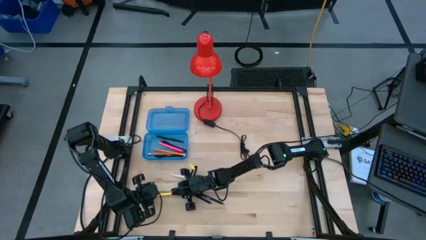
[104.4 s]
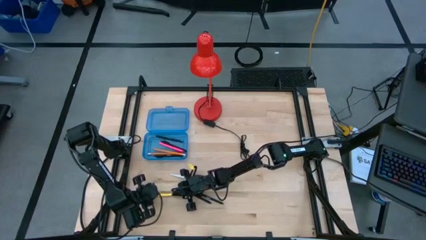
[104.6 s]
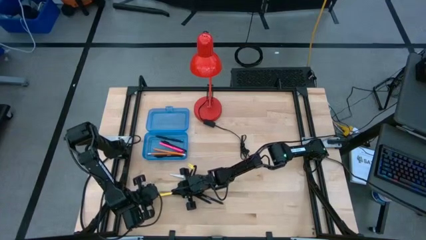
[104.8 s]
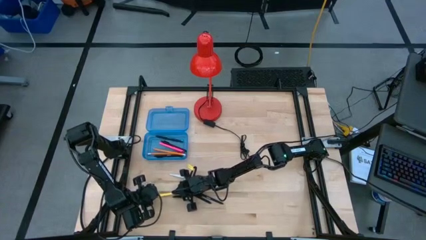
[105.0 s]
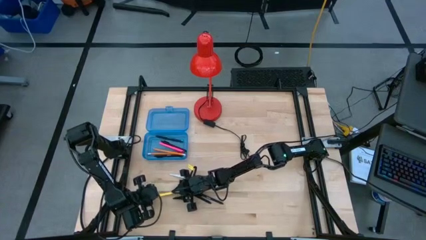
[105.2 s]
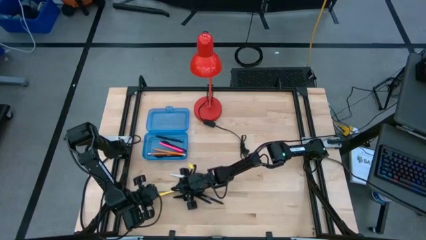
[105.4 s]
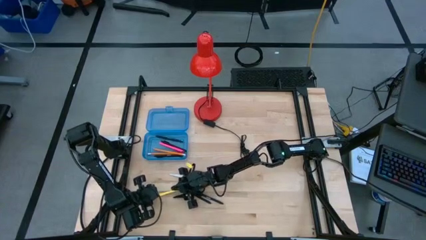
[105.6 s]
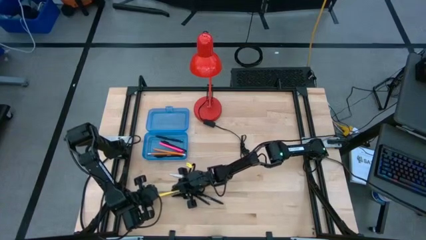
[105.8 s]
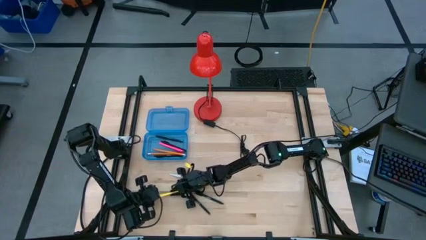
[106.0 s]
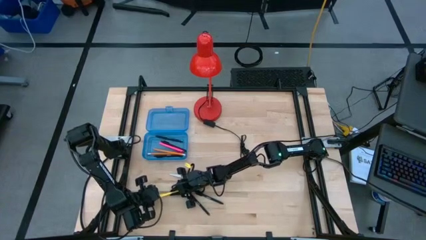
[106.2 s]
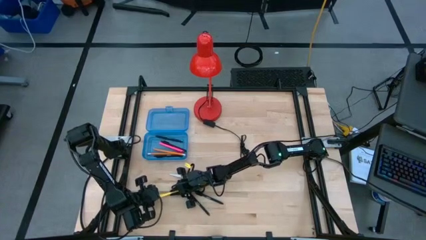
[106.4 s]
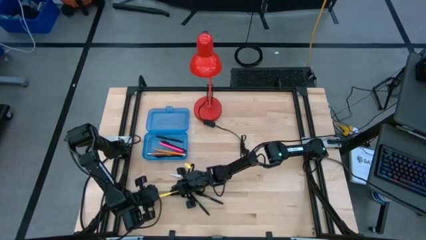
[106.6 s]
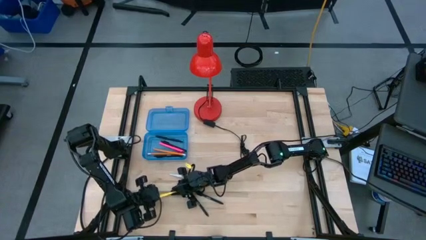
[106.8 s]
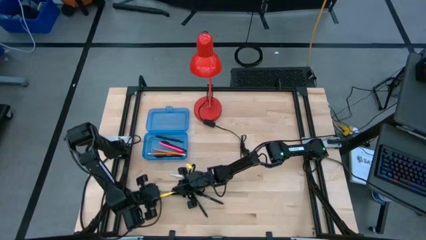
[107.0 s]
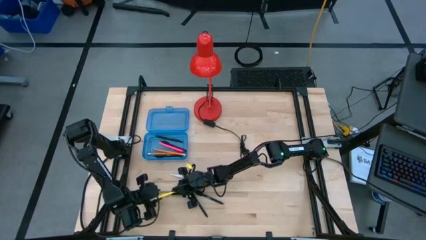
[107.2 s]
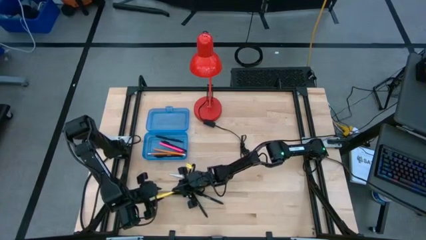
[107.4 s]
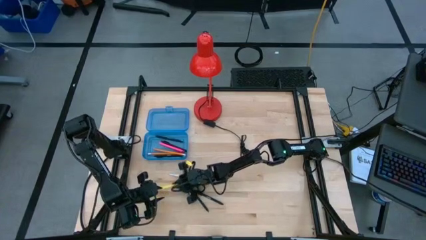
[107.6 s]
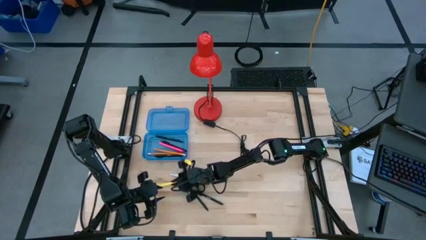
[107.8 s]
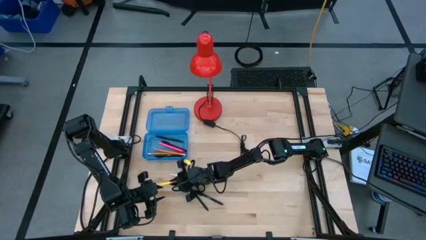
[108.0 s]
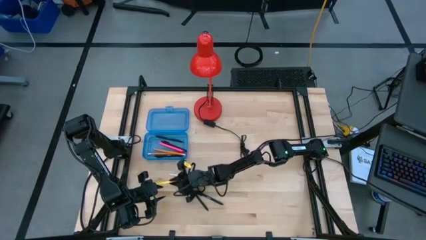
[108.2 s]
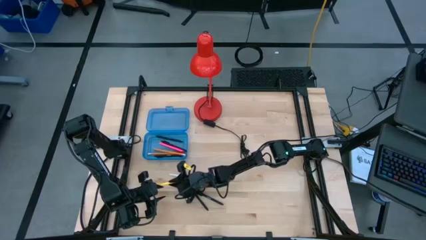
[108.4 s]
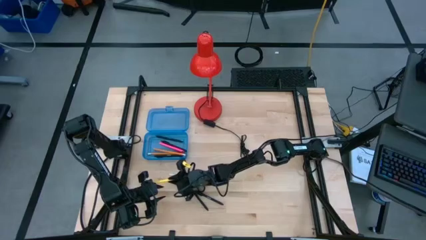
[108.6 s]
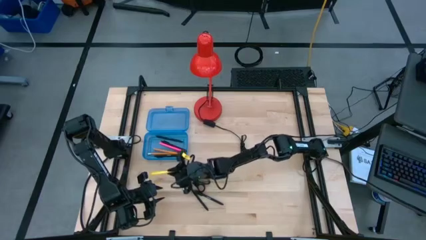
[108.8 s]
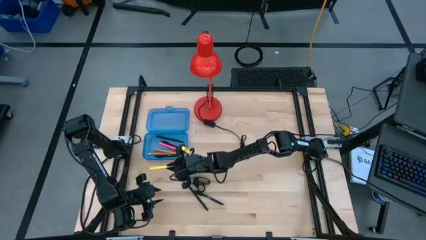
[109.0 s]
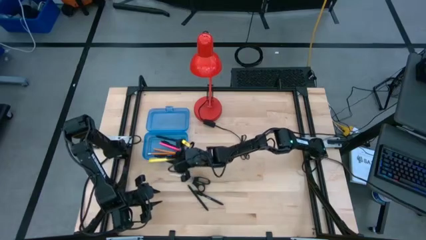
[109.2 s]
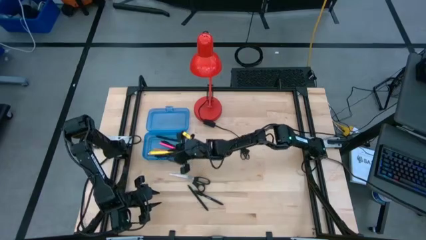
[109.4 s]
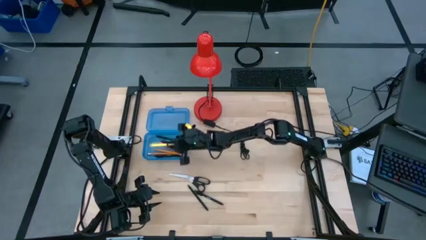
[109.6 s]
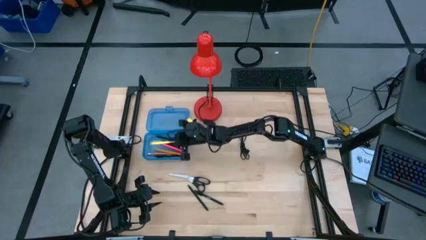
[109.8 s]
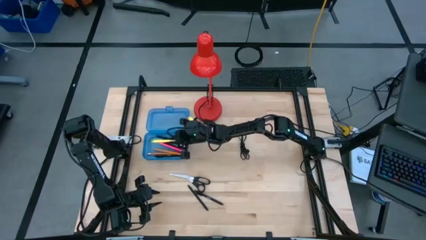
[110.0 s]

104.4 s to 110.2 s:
Task: Pick & place school supplies into a supply box
Put the yellow pen into the blue supply box

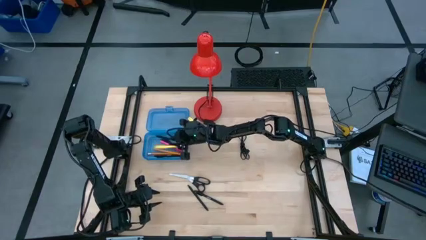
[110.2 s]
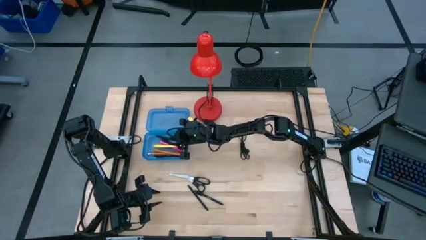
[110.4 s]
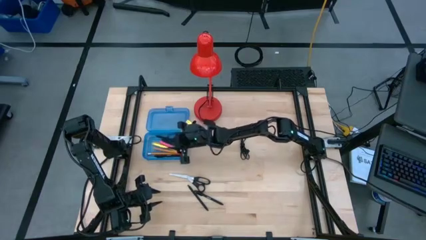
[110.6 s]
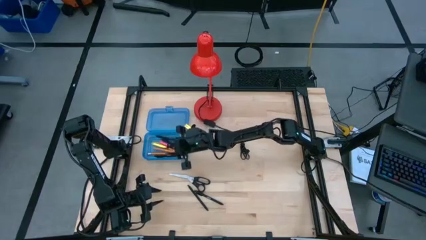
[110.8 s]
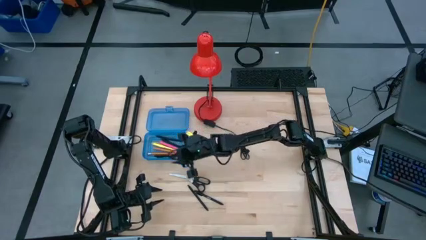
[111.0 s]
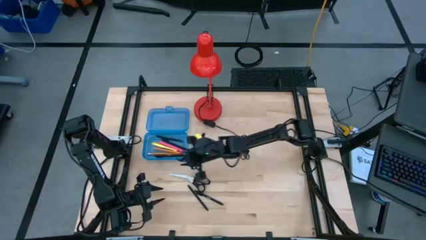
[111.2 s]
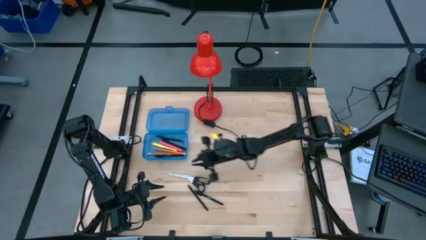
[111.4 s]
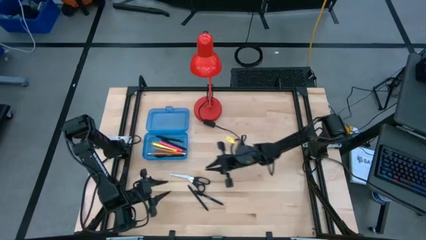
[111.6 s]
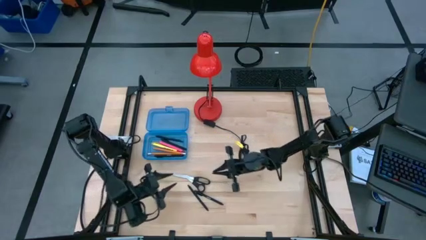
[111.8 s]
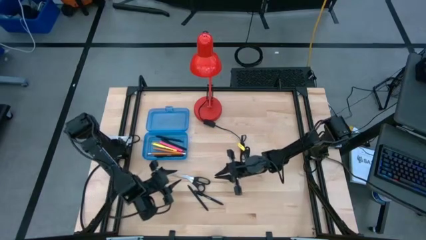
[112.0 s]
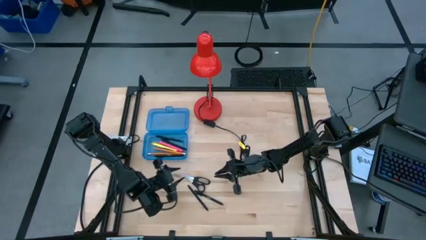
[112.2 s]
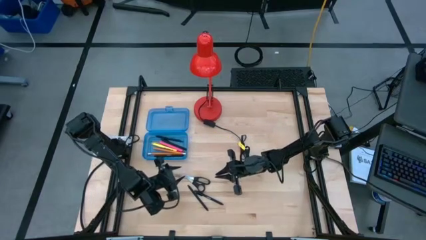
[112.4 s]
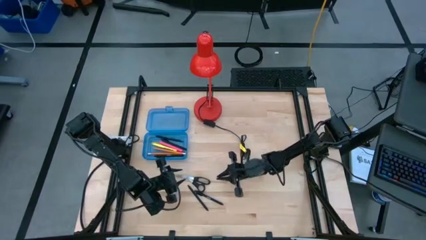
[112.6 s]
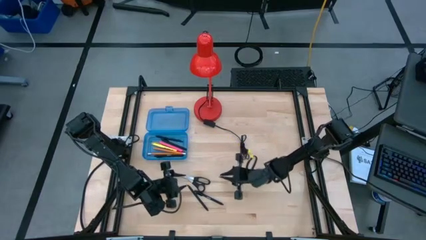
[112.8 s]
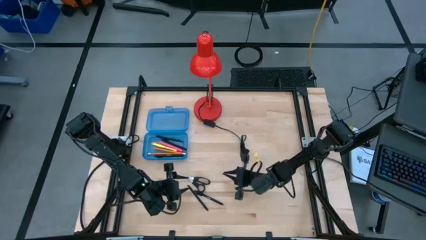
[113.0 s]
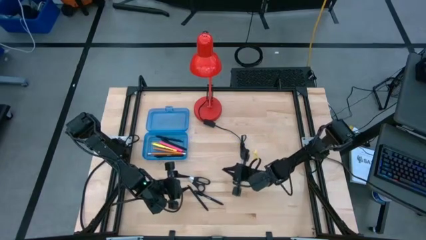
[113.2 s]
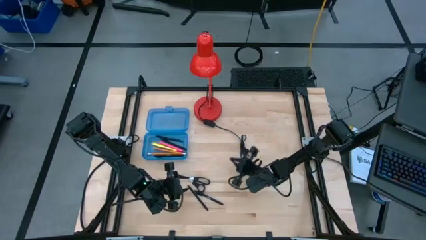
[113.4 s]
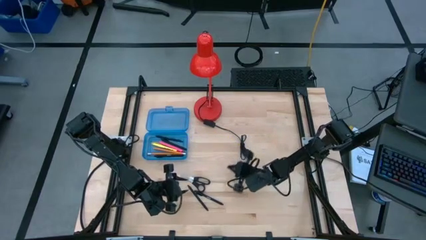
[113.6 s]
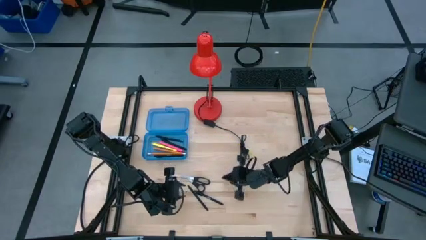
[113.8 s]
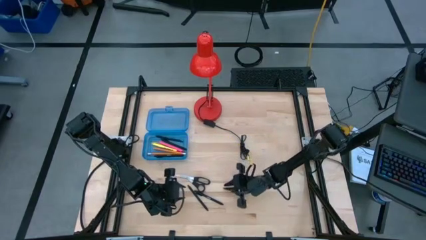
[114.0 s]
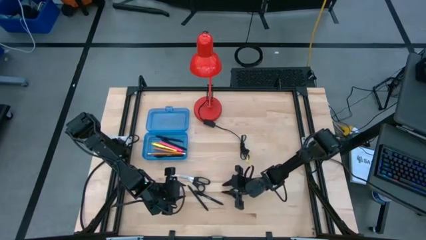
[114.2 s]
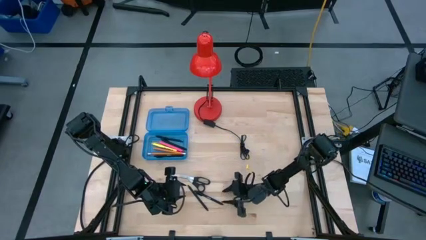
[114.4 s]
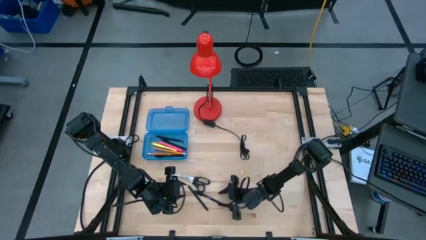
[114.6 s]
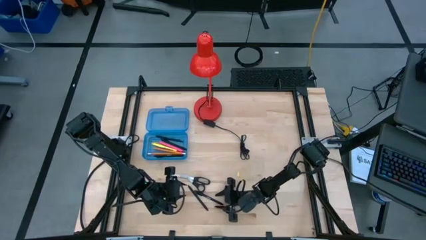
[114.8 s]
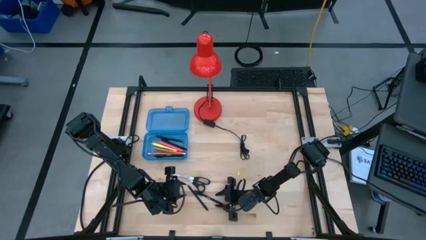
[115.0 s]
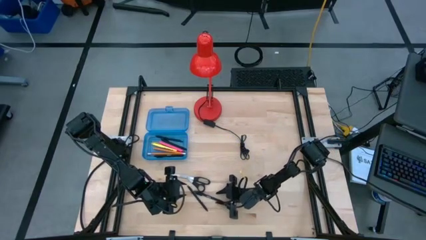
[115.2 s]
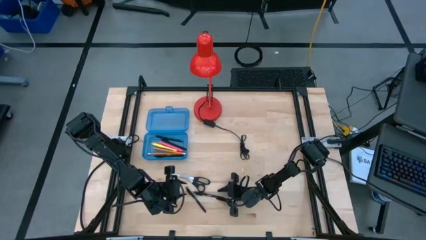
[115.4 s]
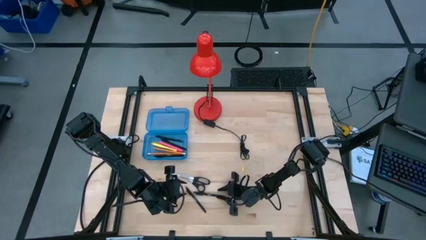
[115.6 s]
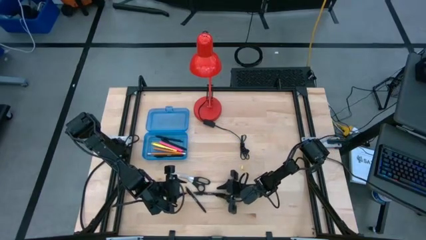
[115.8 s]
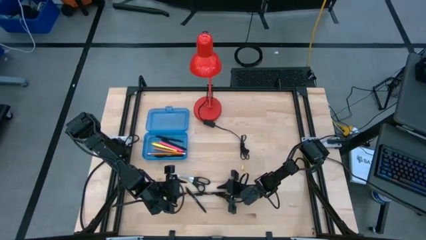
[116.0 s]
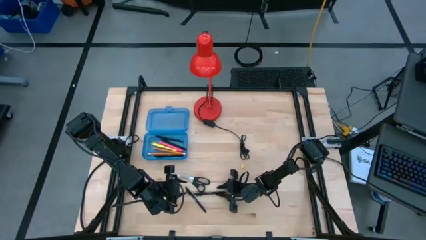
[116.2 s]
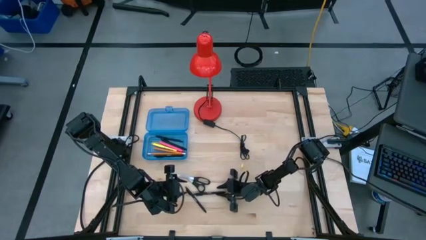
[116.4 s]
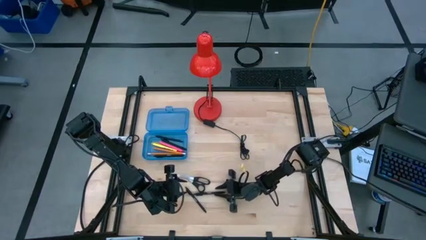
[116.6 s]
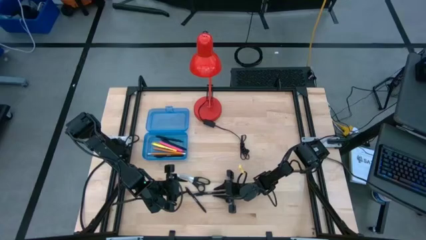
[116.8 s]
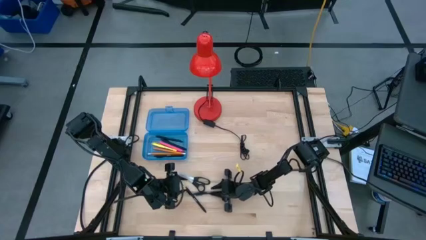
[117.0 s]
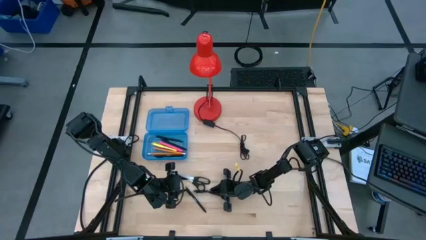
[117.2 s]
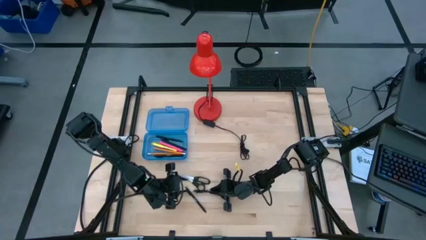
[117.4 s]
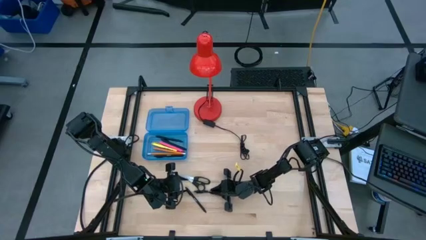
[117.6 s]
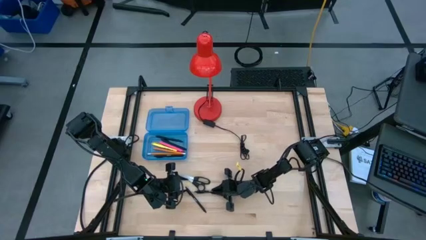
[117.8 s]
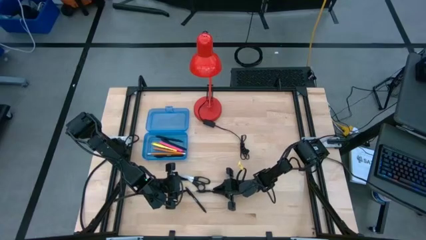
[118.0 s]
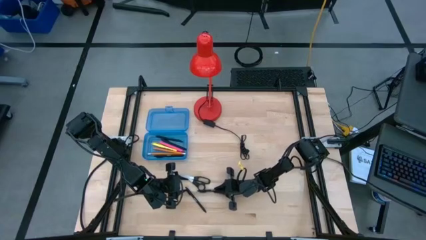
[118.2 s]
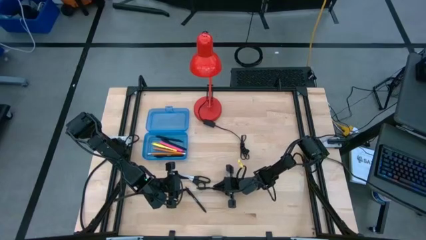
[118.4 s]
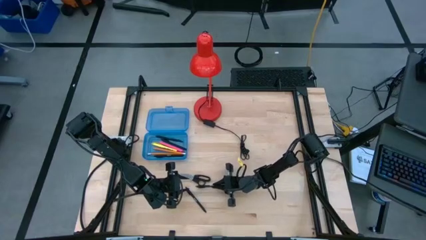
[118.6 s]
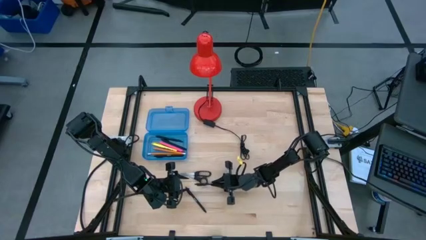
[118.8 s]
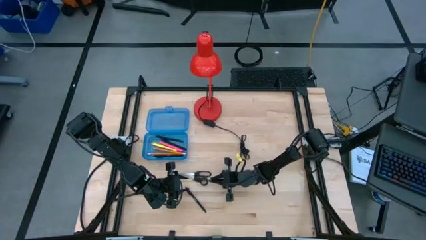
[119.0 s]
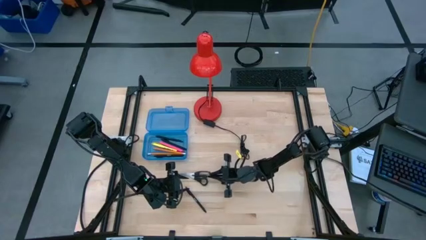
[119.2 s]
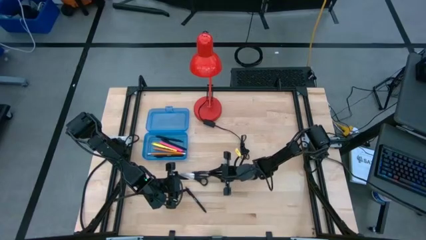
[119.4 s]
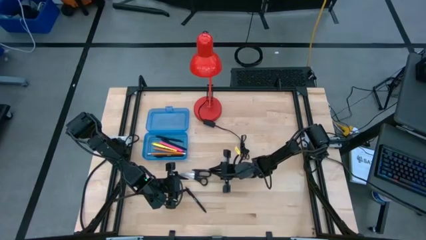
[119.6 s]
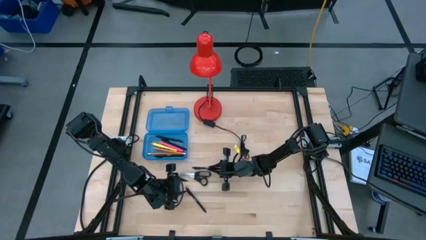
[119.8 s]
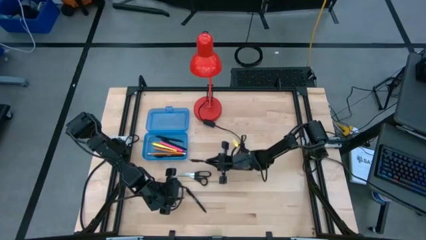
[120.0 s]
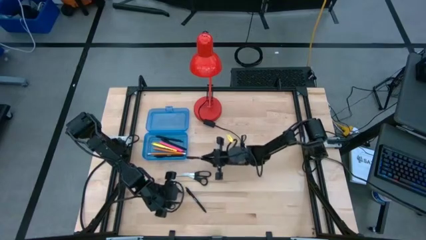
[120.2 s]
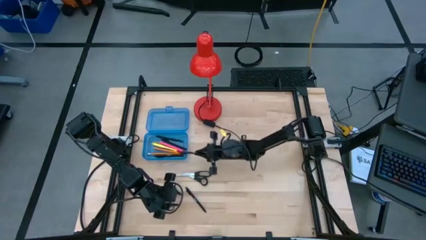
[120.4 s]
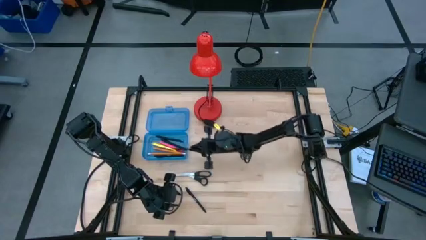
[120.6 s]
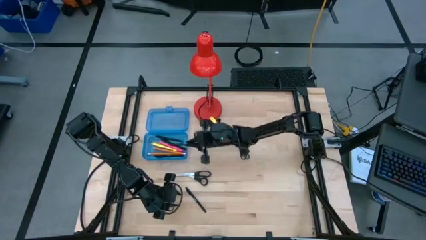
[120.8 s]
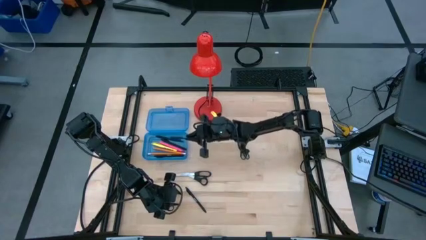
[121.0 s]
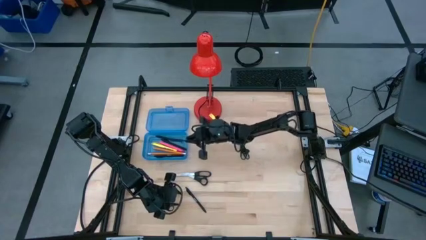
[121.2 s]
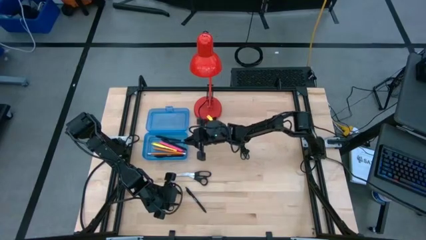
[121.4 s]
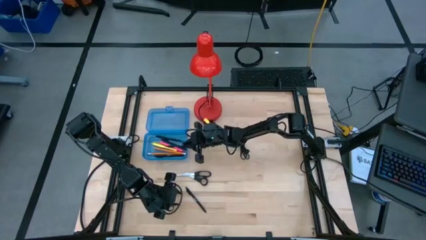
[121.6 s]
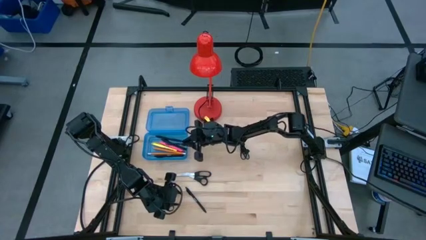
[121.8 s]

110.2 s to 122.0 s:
Put the black pen into the blue supply box
